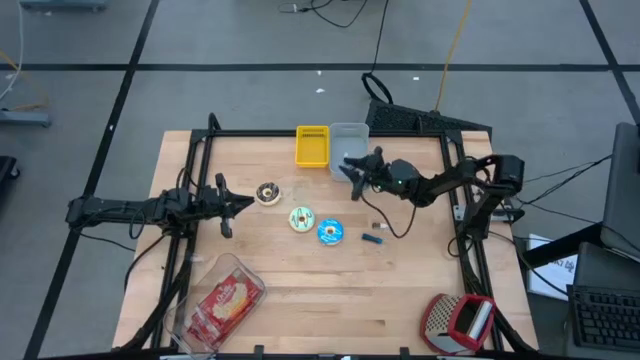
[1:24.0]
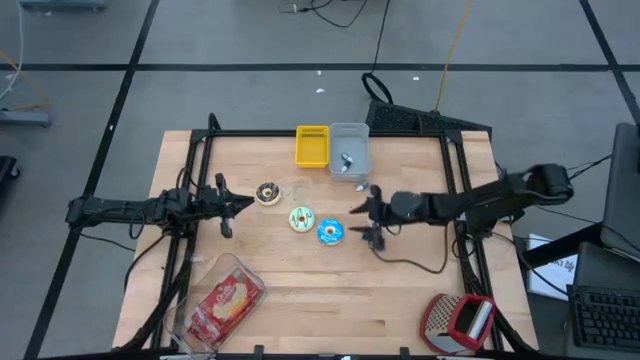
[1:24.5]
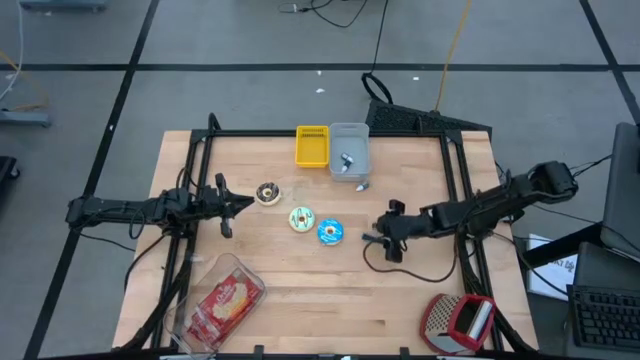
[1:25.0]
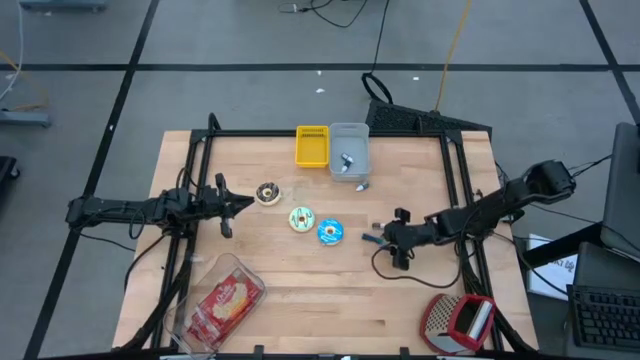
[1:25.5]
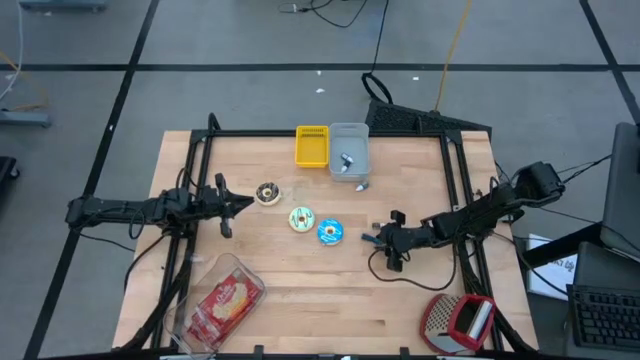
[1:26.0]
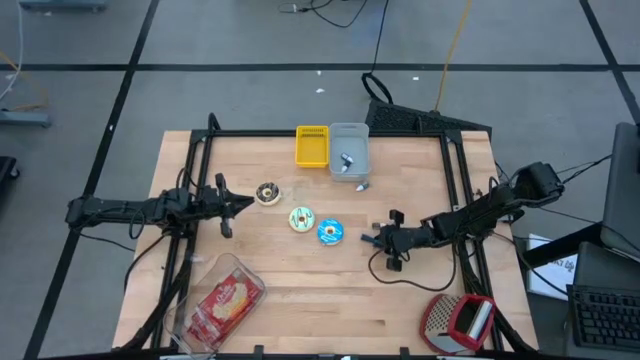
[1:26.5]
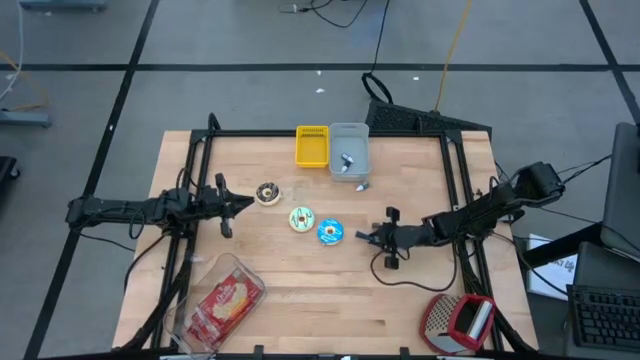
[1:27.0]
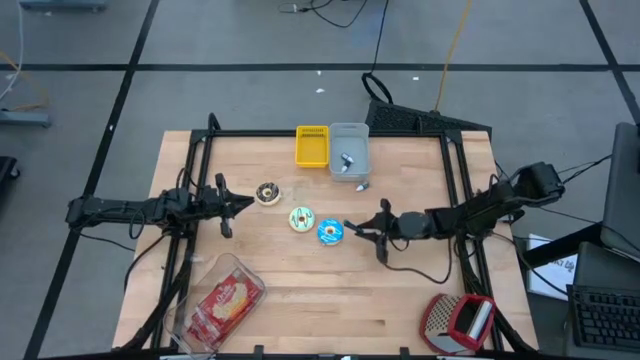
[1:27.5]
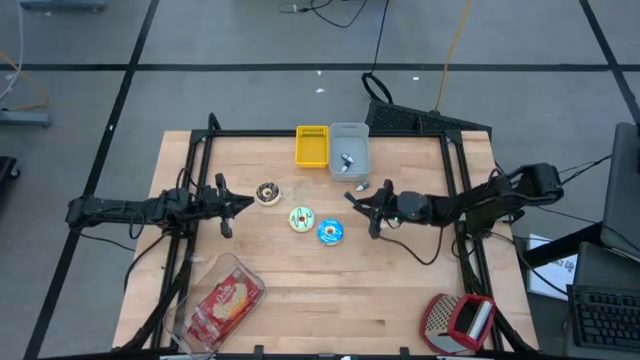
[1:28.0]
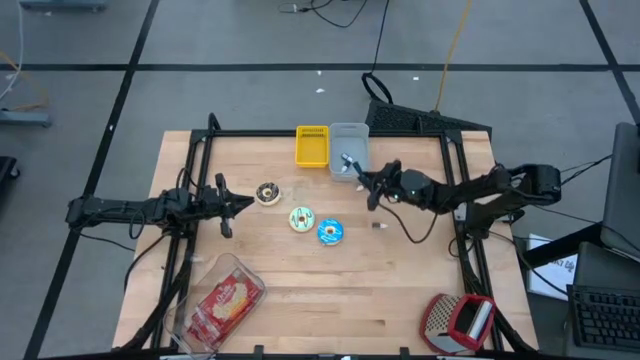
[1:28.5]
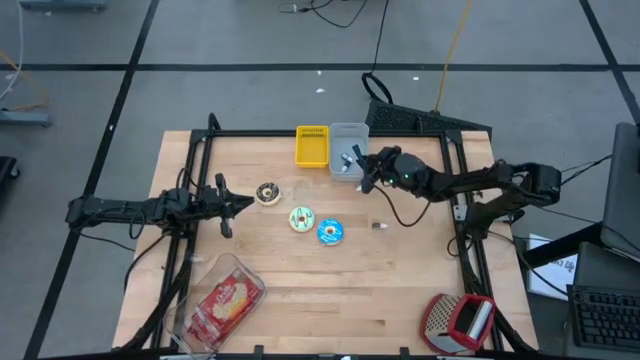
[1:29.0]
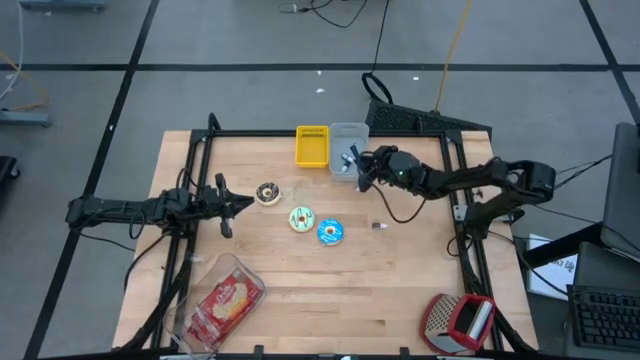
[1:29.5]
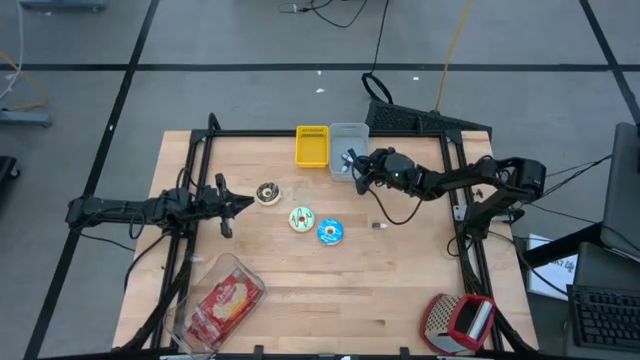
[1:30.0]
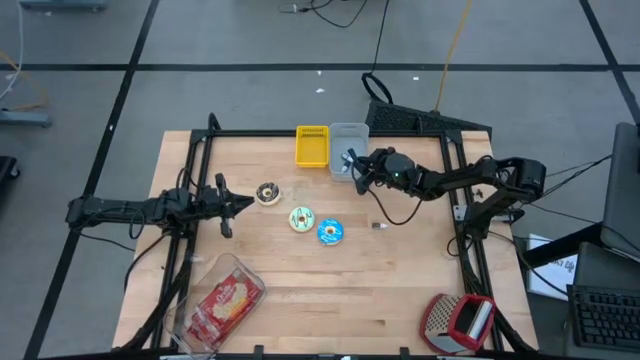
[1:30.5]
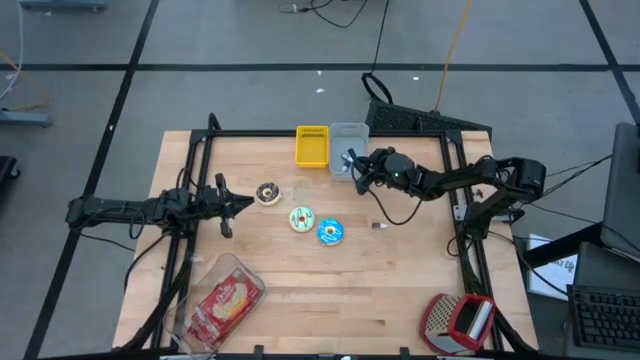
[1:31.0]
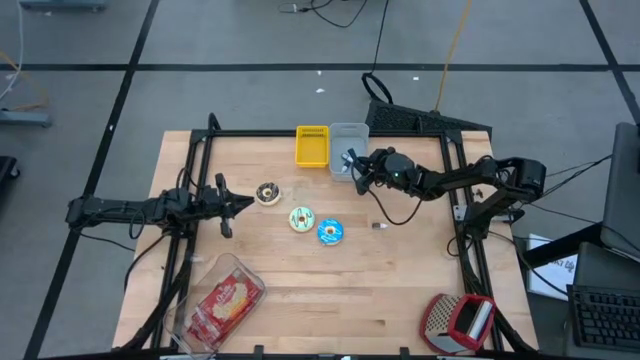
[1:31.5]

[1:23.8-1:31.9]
Put the dark blue food coloring bottle into the white bin

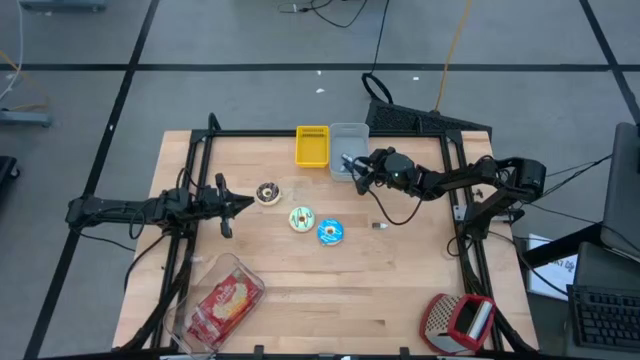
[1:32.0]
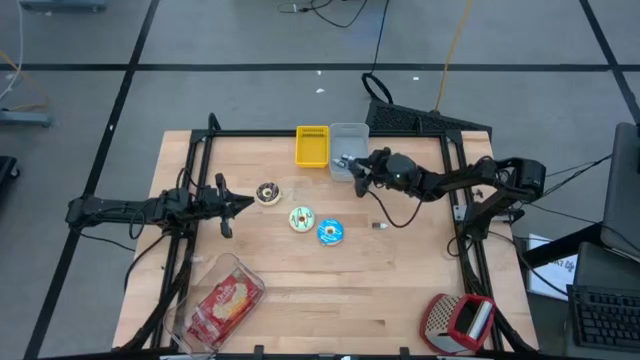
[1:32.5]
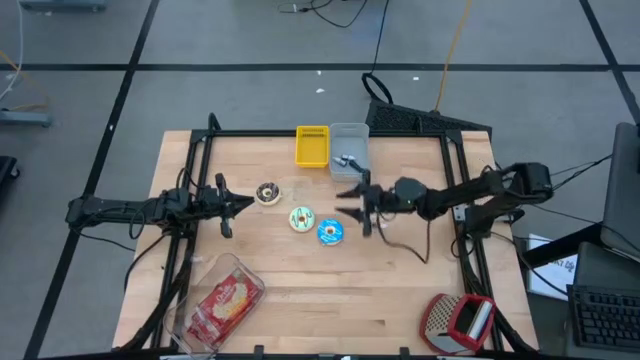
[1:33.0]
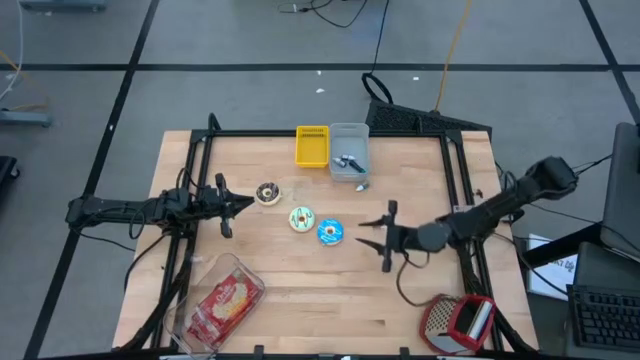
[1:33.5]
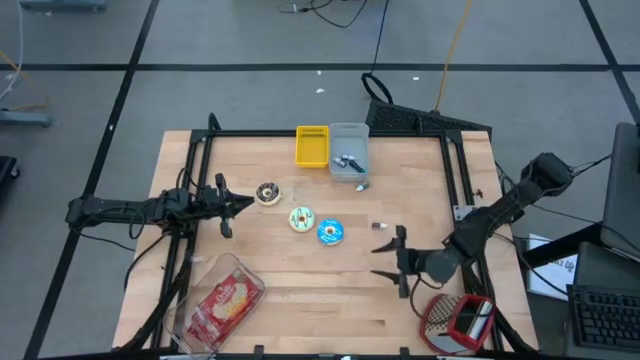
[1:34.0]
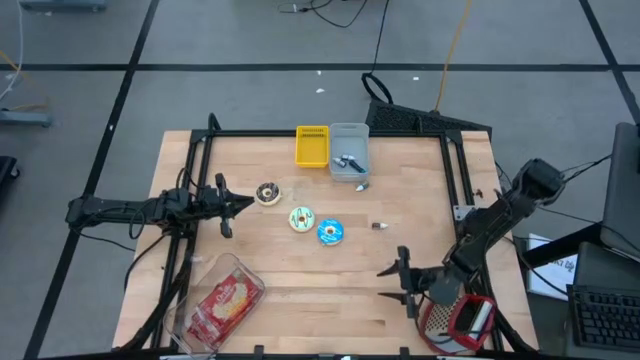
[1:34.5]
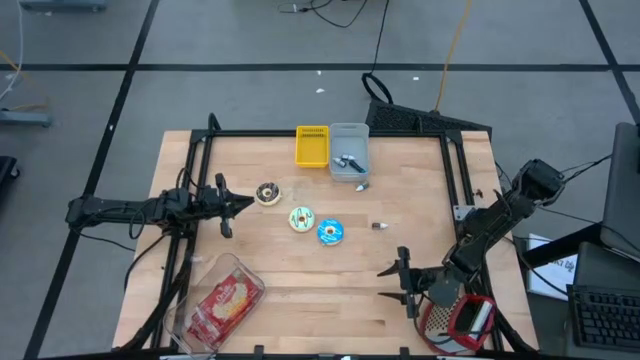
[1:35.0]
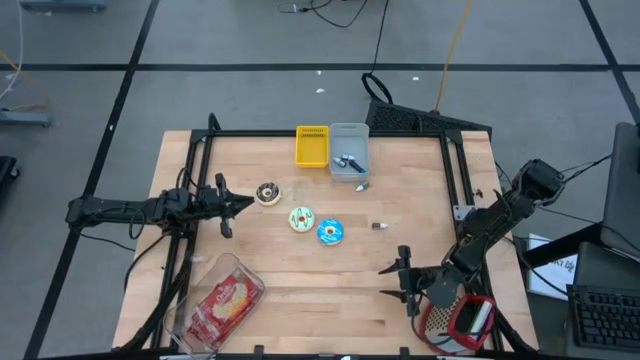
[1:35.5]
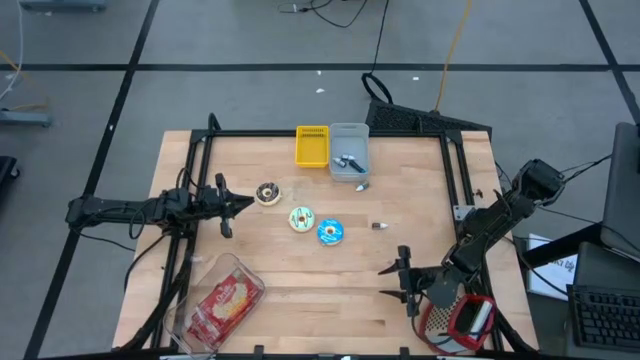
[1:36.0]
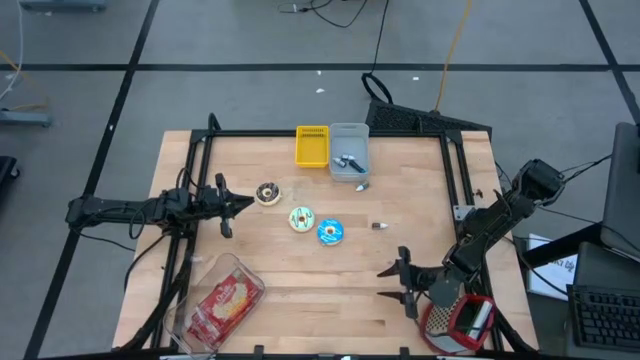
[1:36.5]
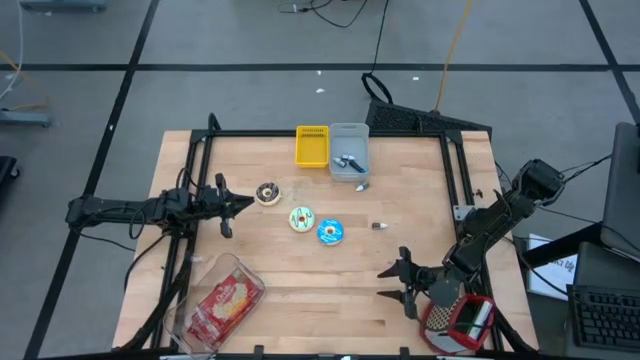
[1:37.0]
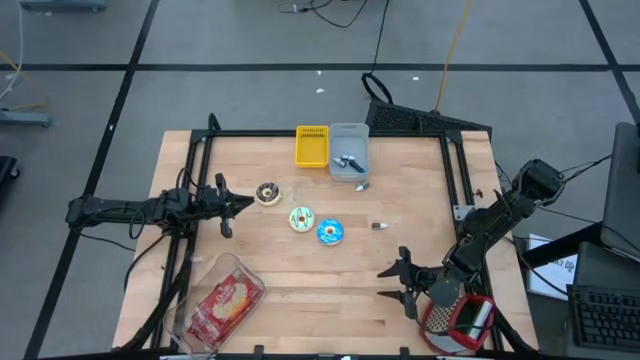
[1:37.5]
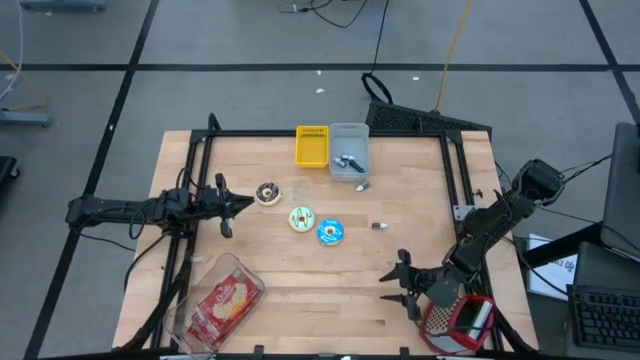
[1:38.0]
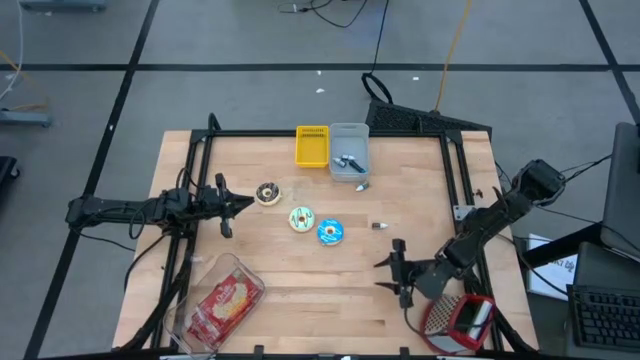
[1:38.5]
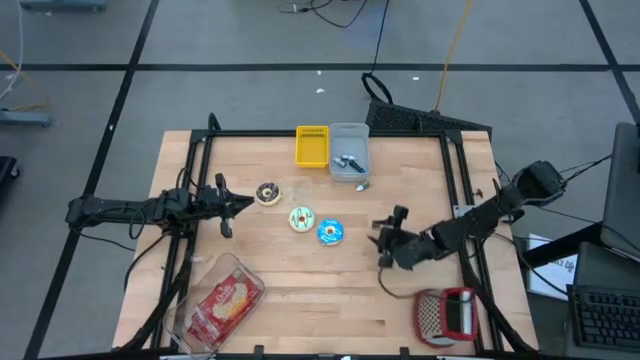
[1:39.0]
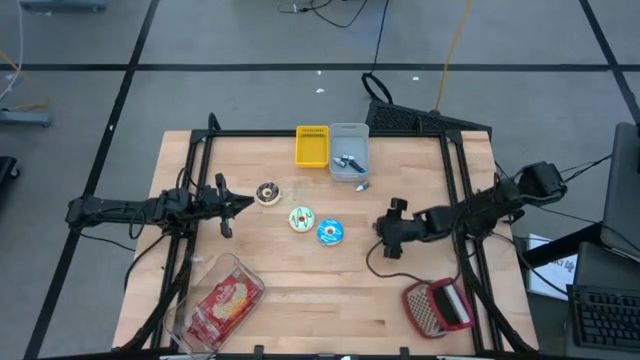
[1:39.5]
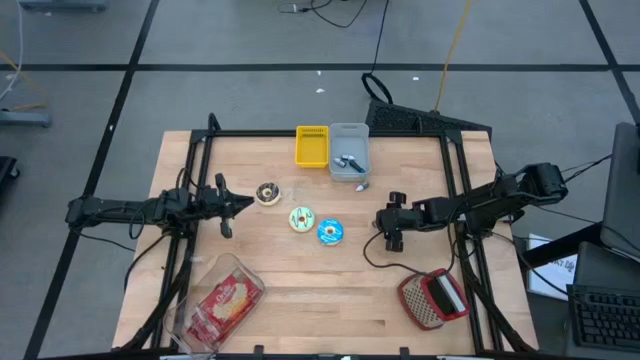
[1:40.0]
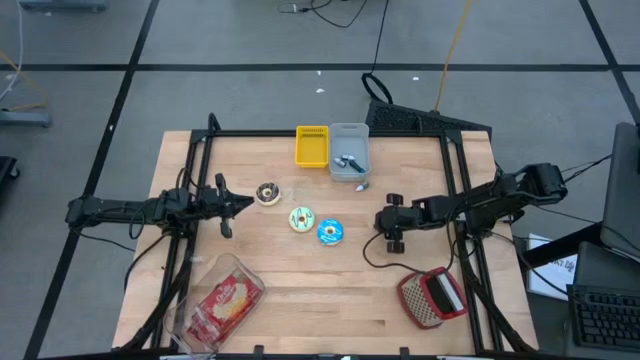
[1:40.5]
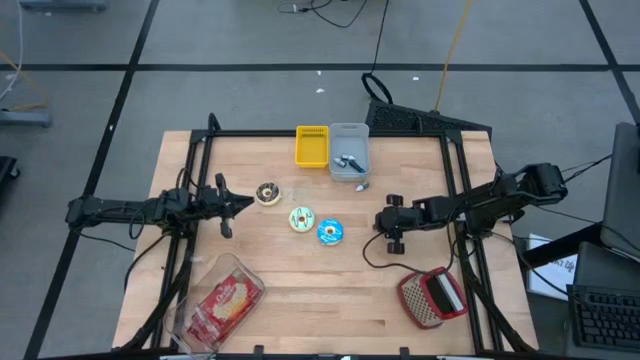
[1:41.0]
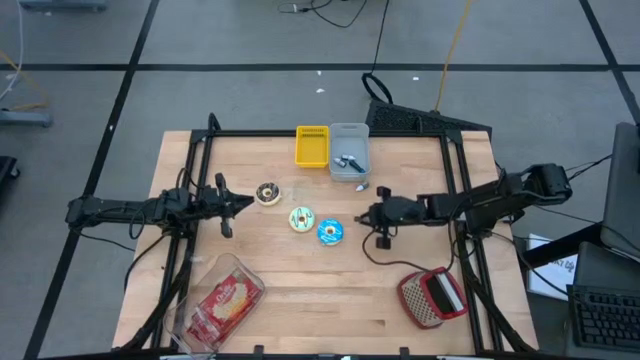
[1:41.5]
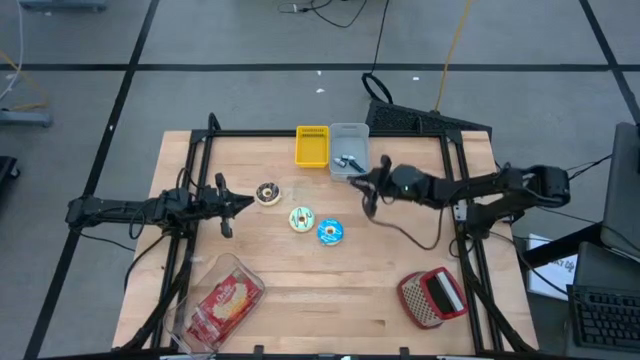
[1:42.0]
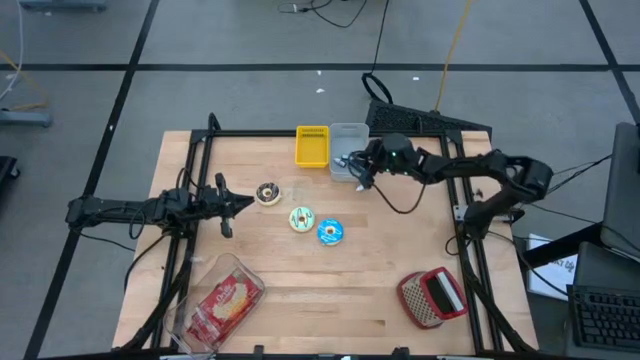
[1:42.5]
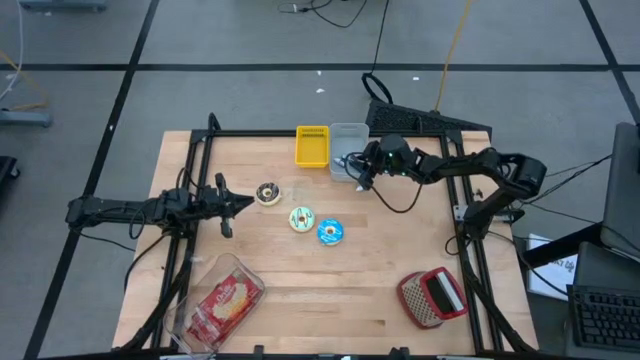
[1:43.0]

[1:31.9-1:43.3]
Put the brown food coloring bottle into the white basket
